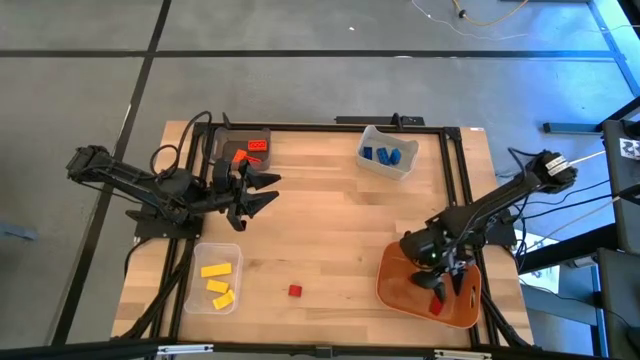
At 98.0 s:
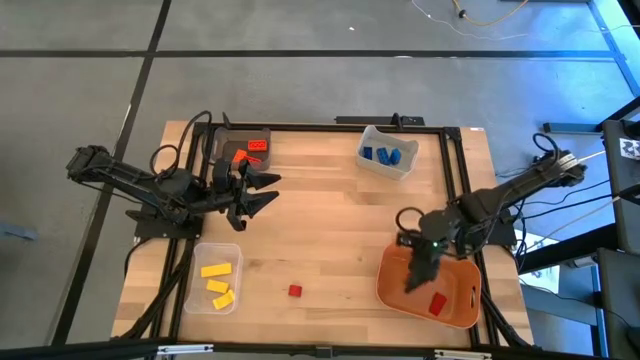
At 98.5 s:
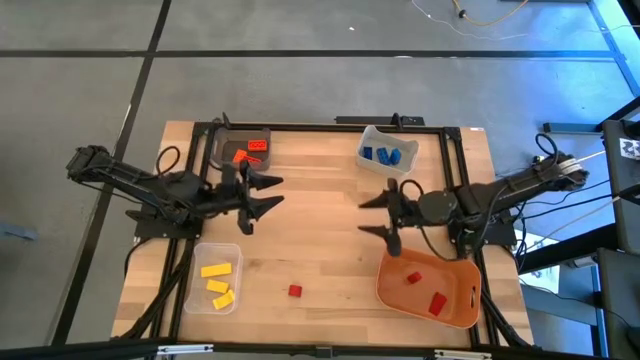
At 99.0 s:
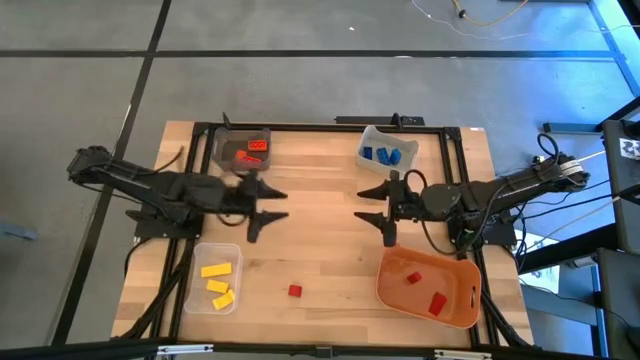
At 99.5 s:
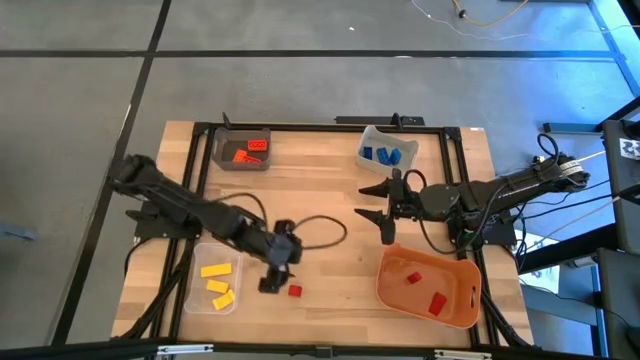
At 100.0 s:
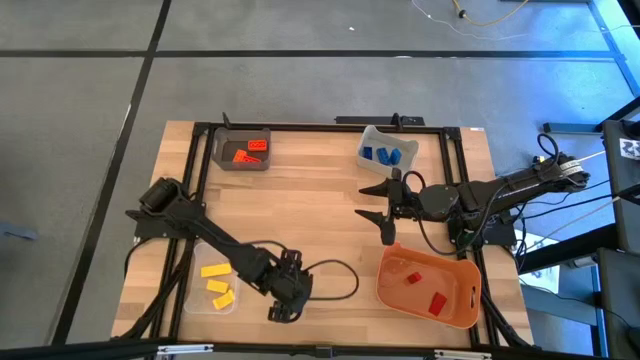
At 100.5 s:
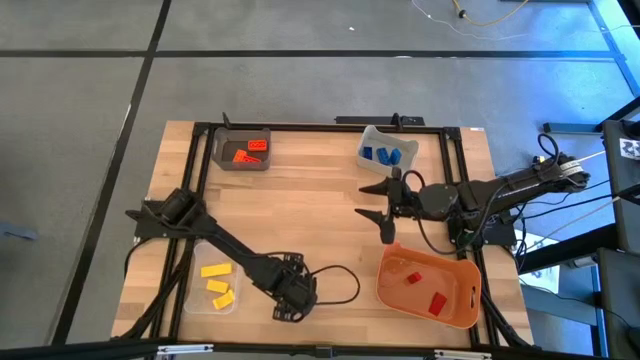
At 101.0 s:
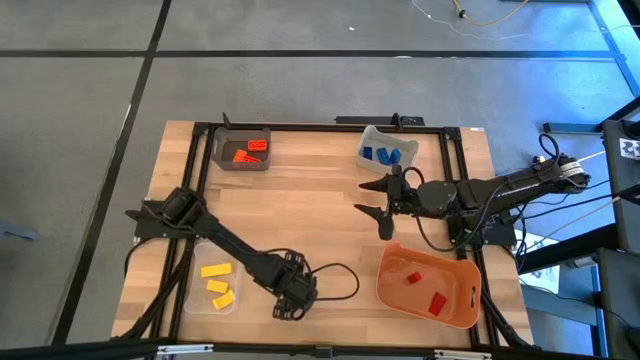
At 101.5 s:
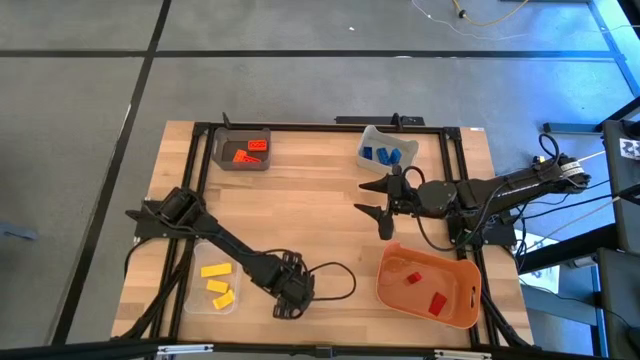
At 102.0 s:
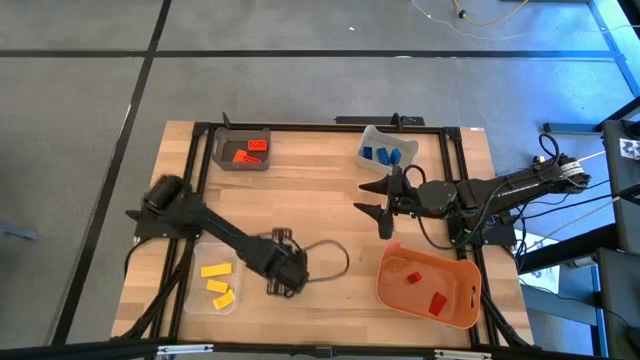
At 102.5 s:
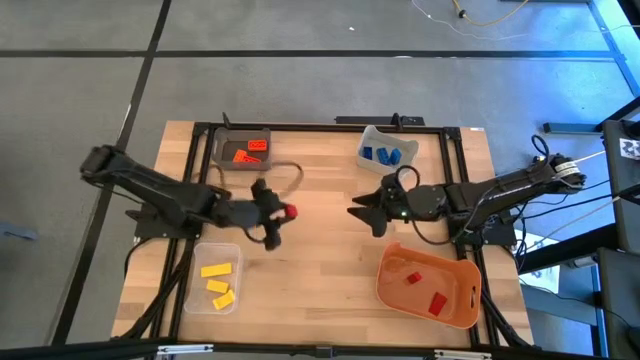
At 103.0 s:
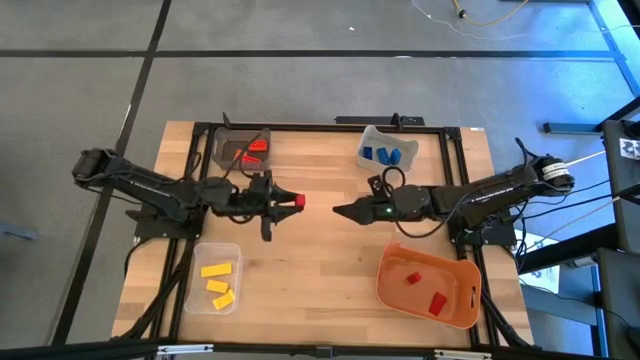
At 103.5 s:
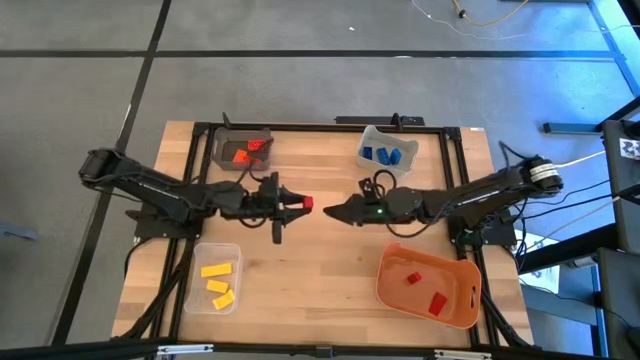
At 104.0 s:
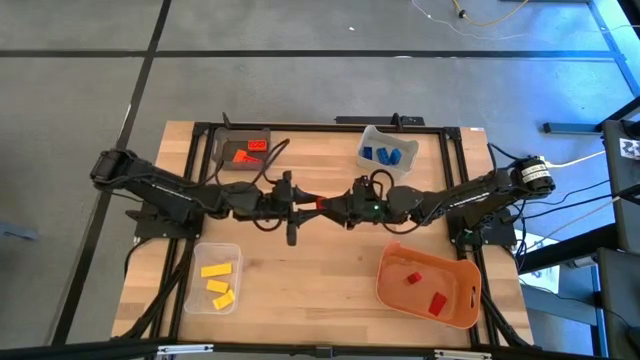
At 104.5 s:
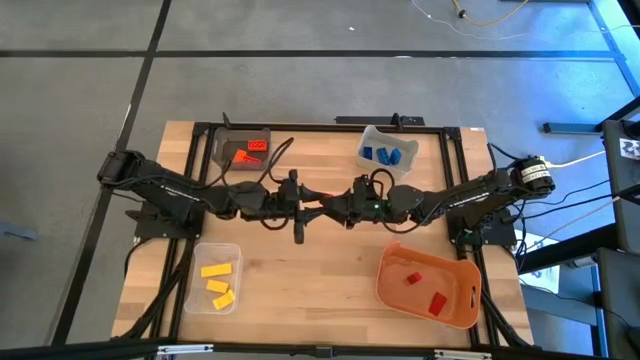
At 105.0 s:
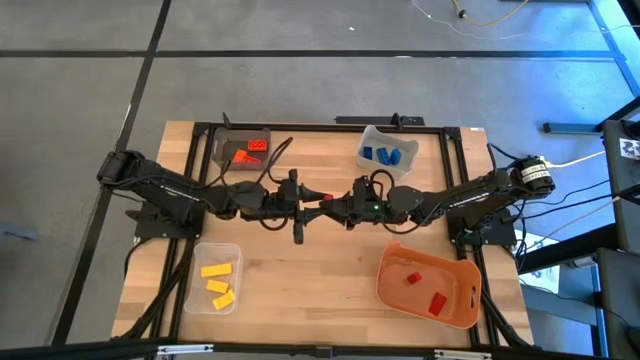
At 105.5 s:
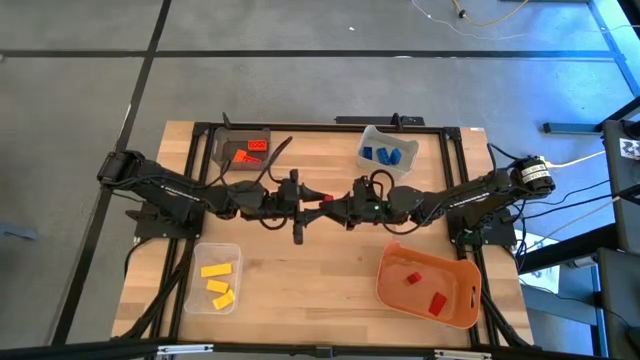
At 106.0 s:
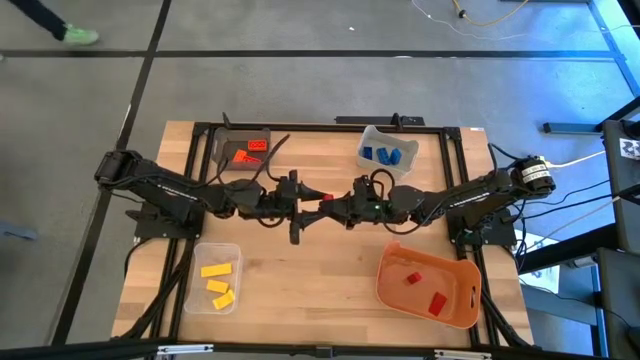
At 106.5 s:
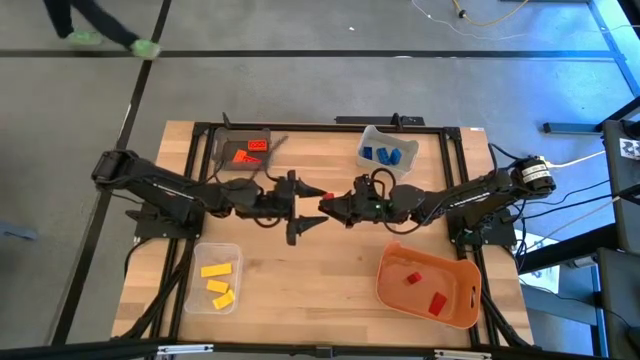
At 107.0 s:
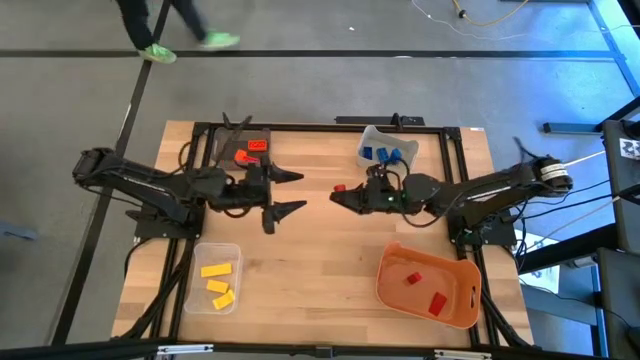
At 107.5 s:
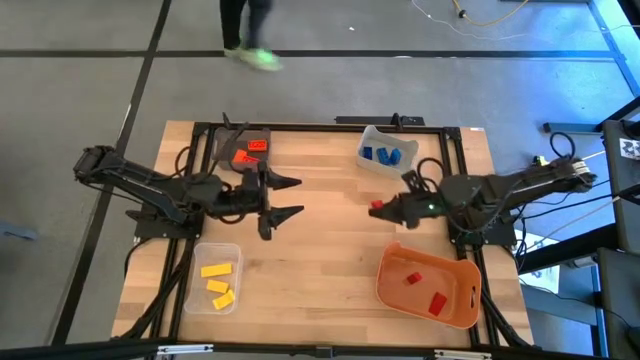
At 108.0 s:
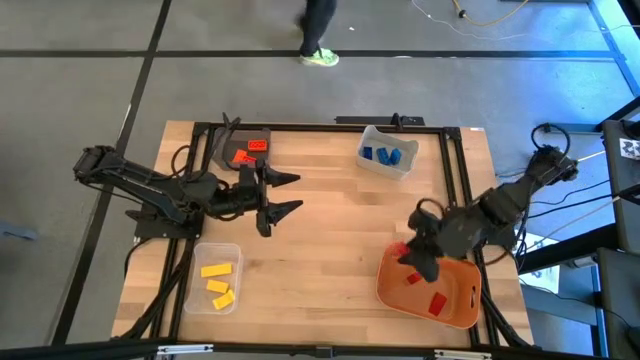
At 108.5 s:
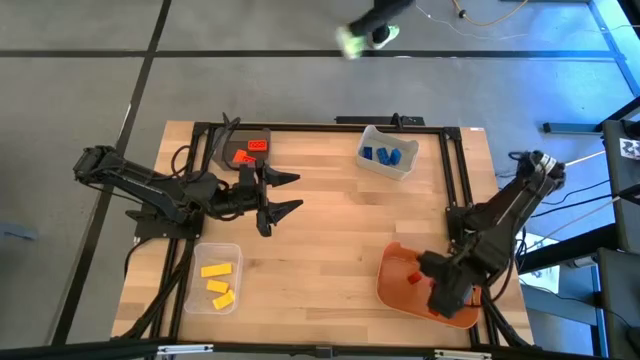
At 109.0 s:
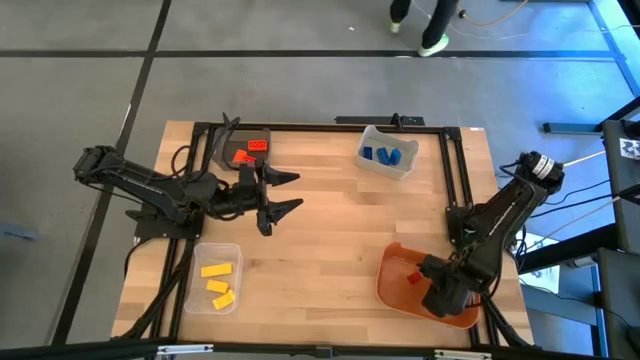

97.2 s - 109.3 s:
Task: Sort & place blocks by color
Put the red block into the orange bin

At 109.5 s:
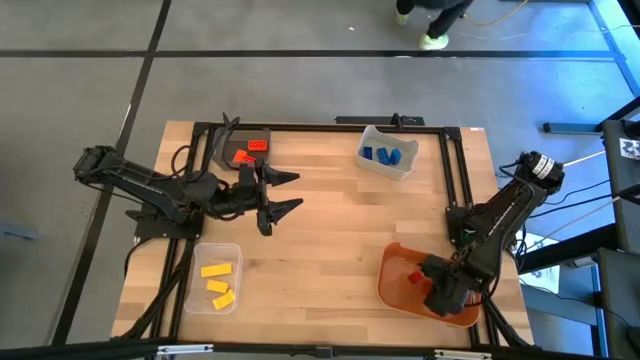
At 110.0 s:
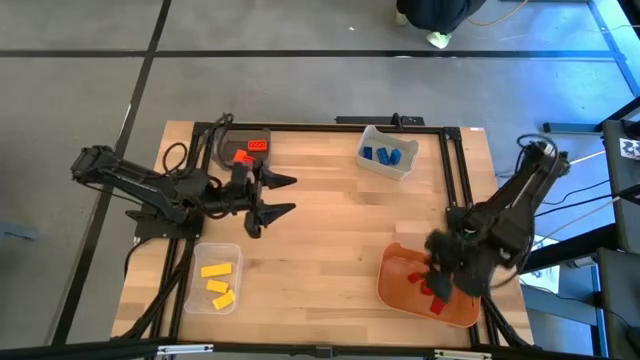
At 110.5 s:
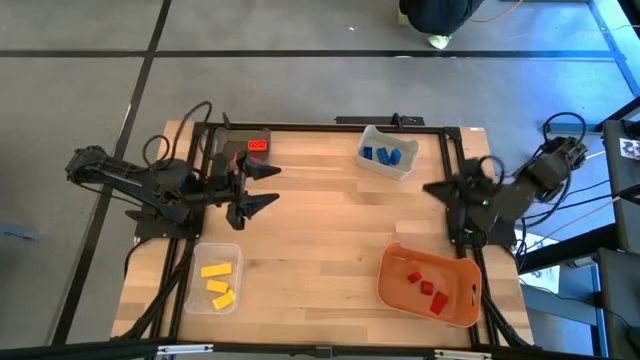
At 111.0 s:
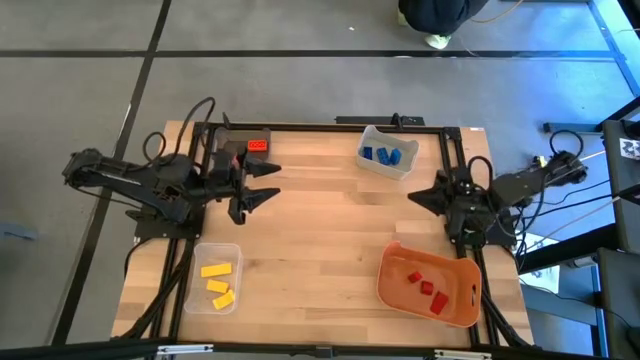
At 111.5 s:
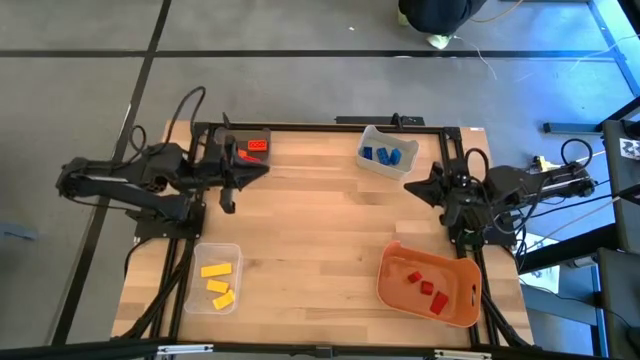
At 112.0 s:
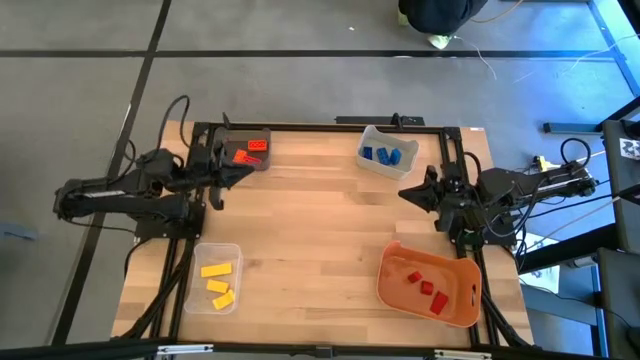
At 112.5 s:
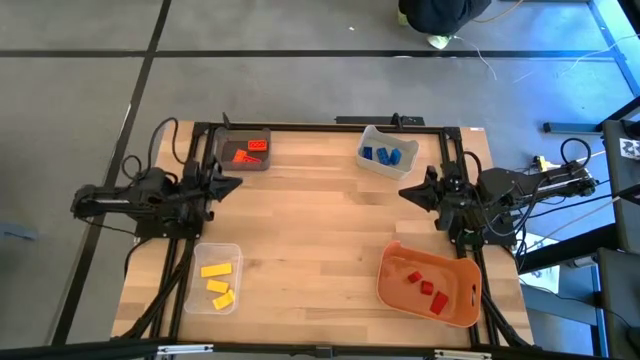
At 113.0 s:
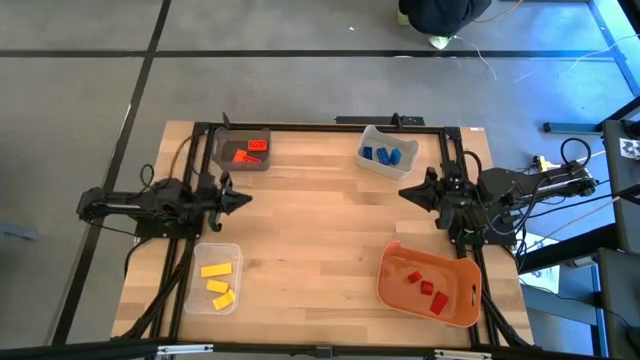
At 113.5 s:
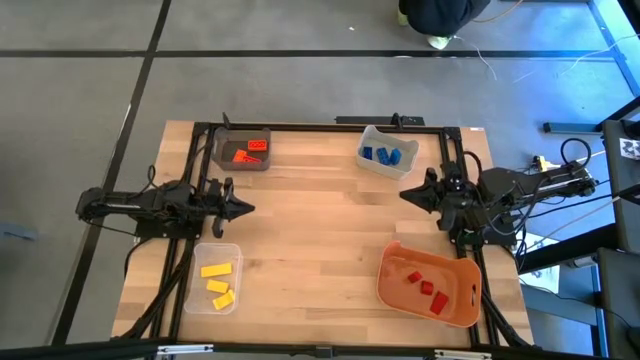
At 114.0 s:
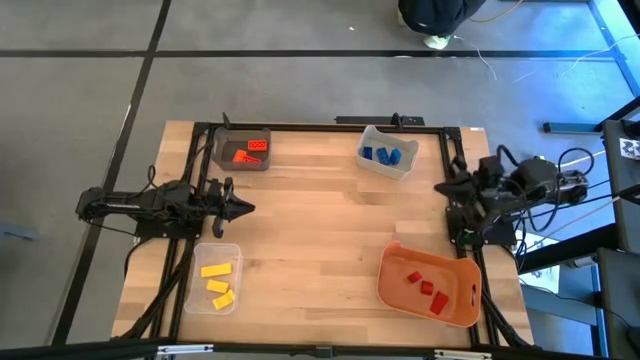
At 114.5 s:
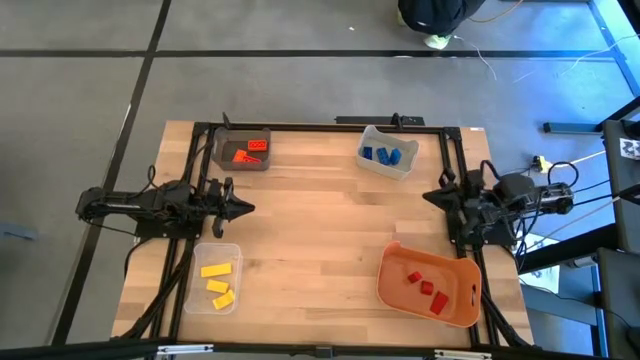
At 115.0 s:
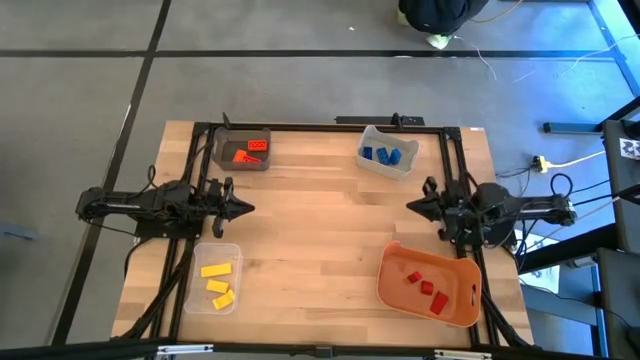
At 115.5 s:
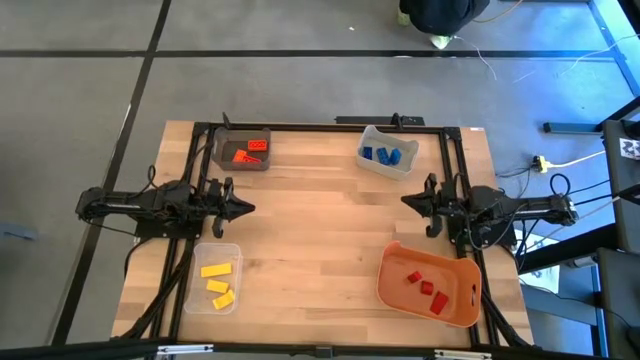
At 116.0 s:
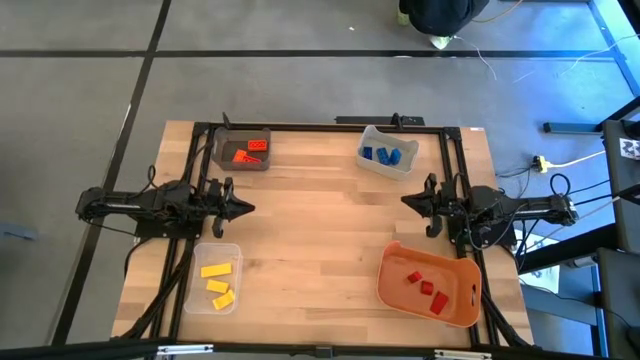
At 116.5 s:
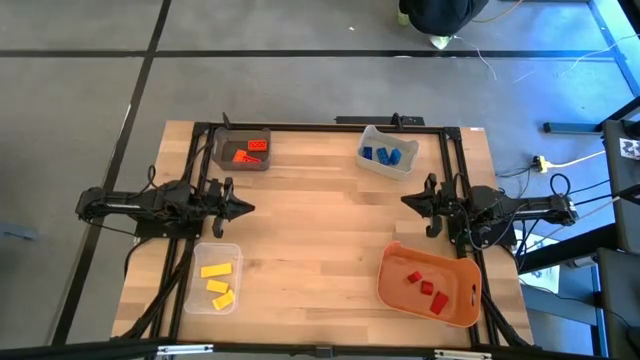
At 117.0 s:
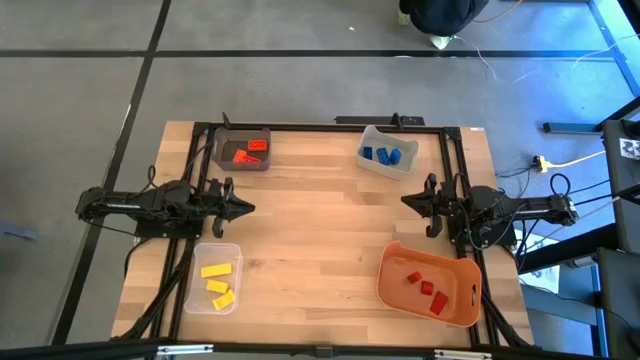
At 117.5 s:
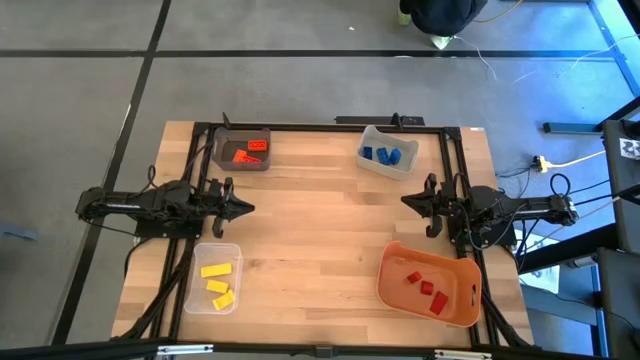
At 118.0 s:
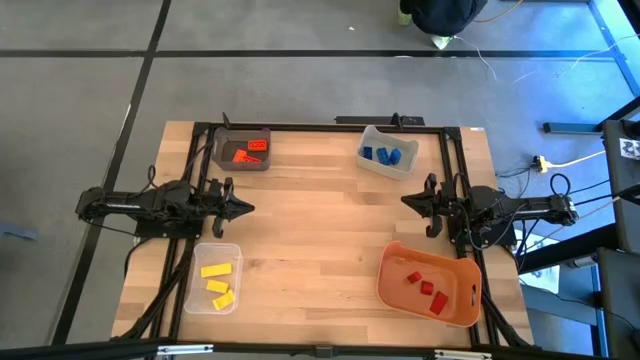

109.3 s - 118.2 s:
Return to Home Position

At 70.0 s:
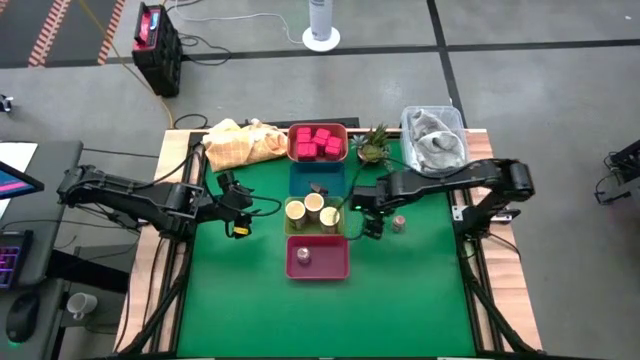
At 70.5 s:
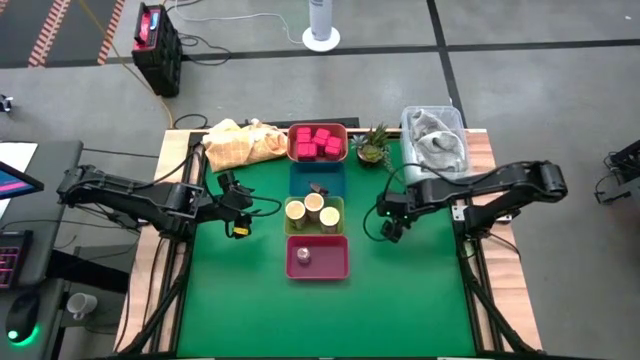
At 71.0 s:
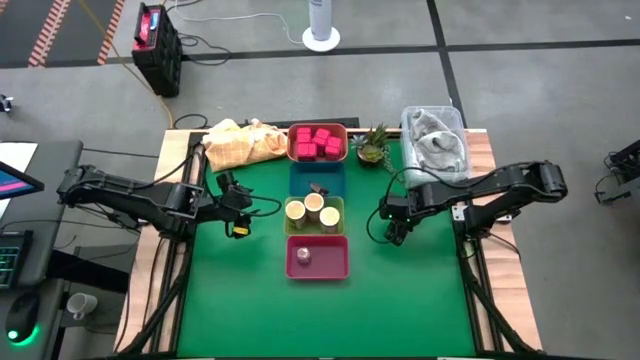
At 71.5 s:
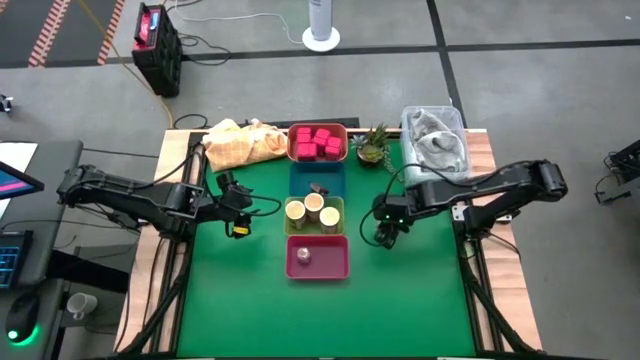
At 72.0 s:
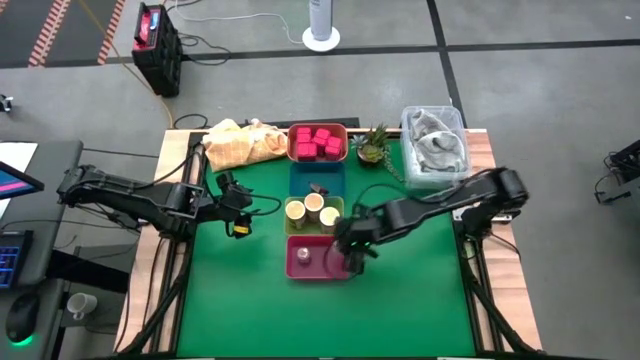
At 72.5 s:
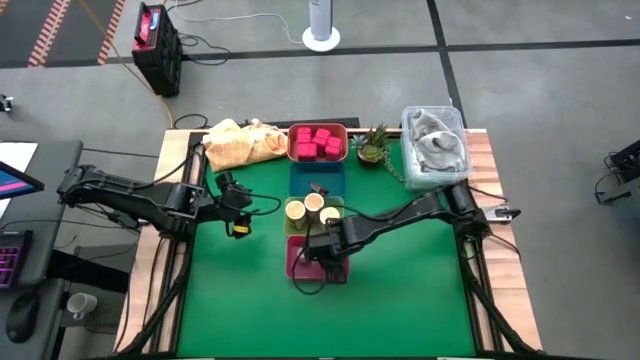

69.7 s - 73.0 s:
Task: Sort spices by type
Put the brown seasoning bottle into the red bin
